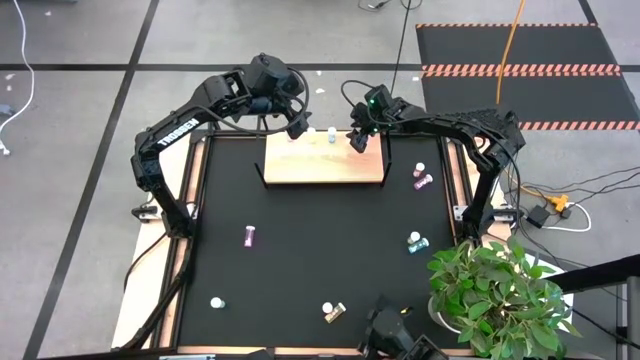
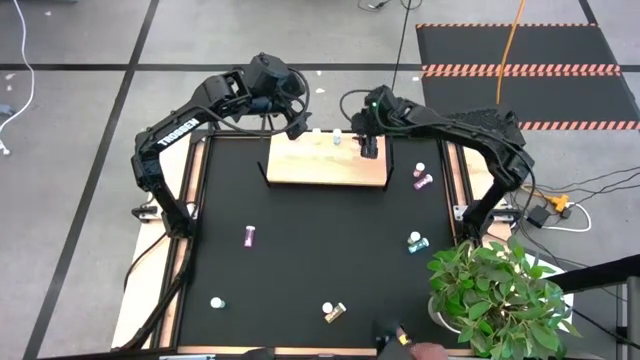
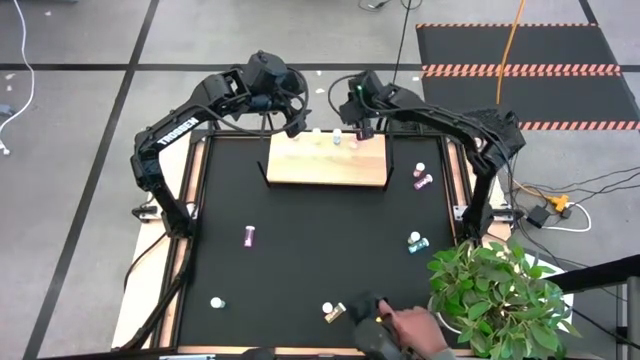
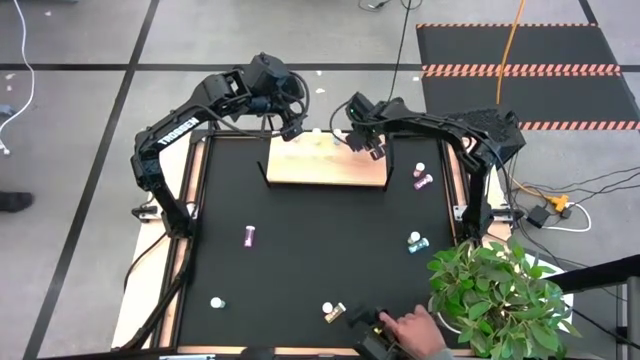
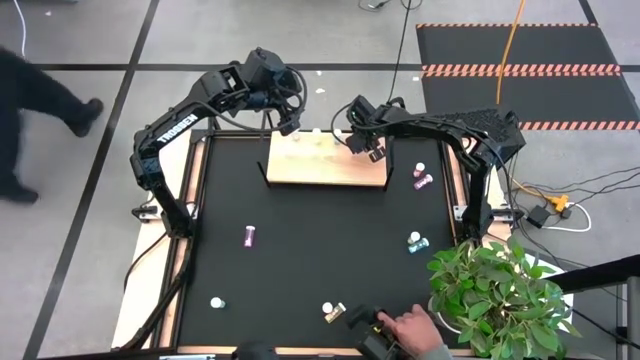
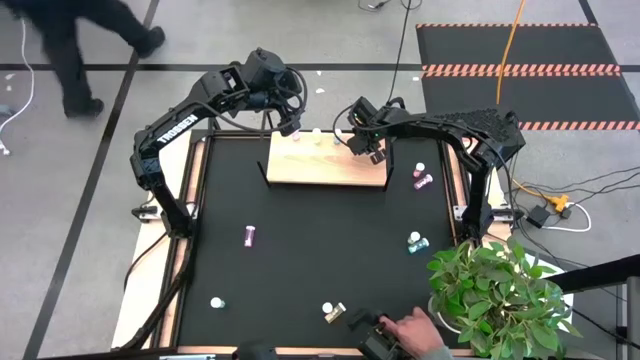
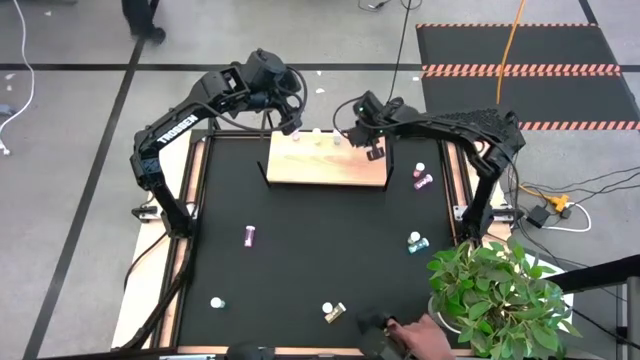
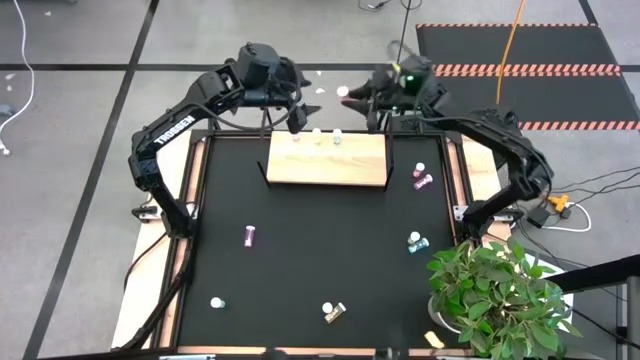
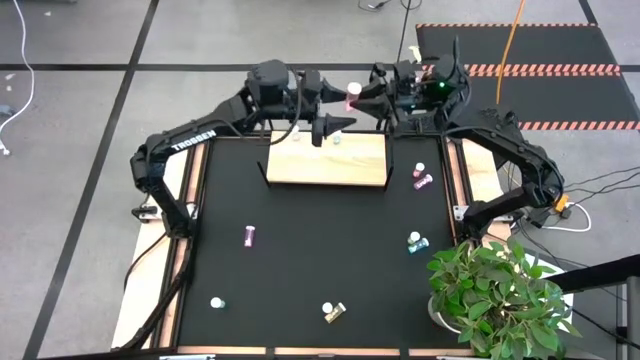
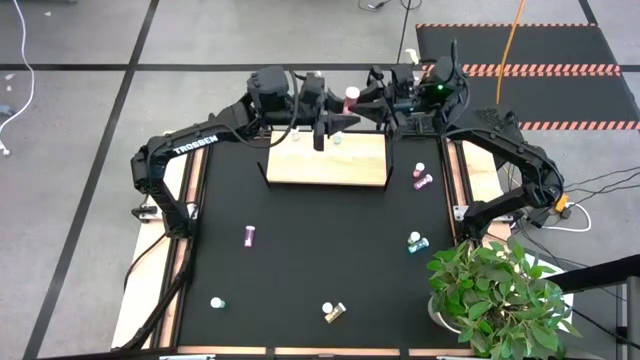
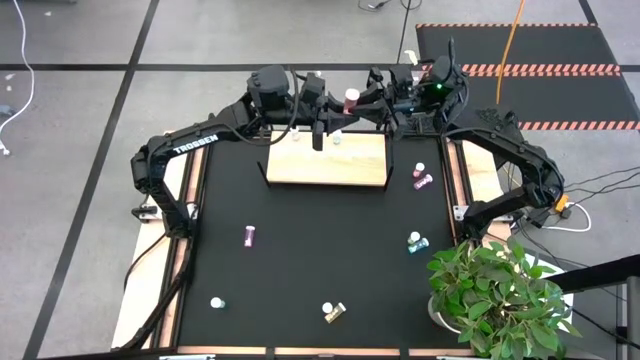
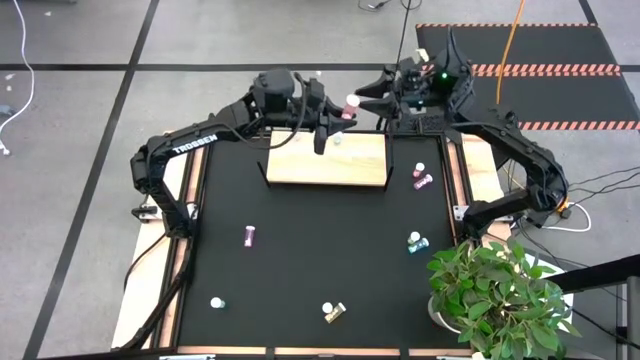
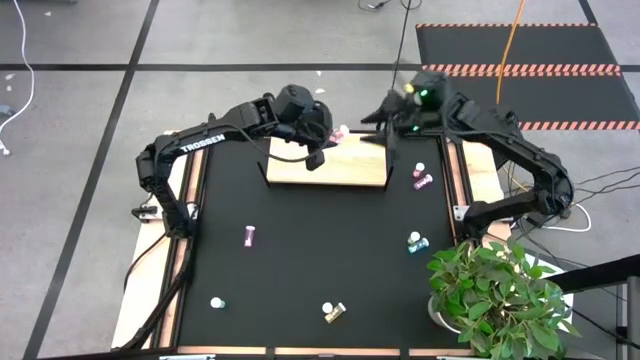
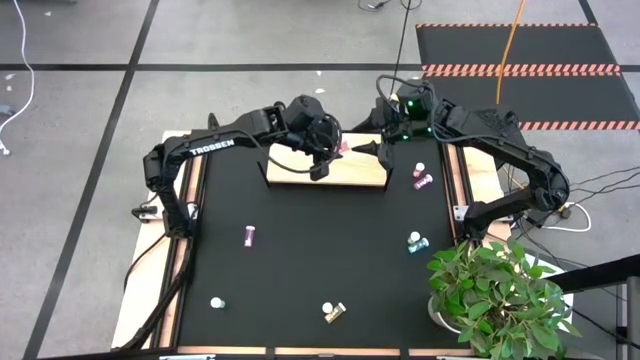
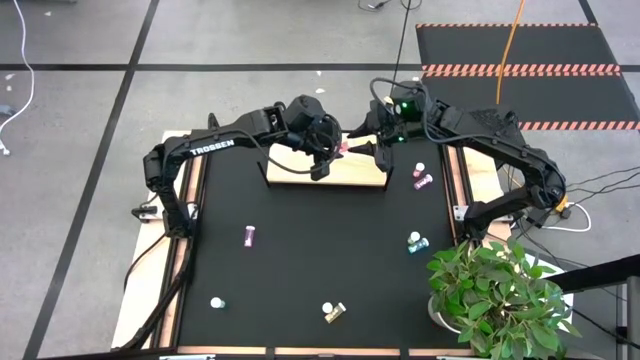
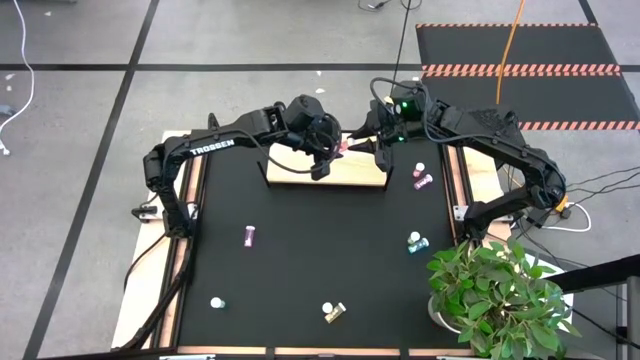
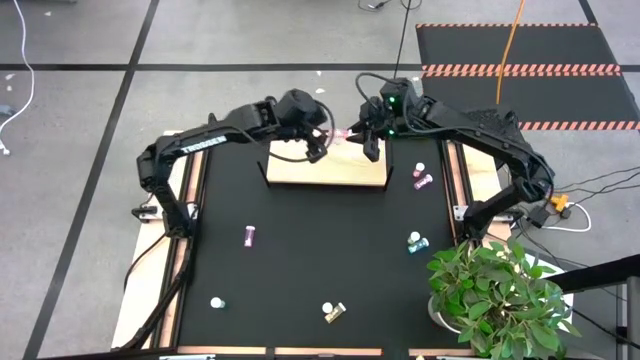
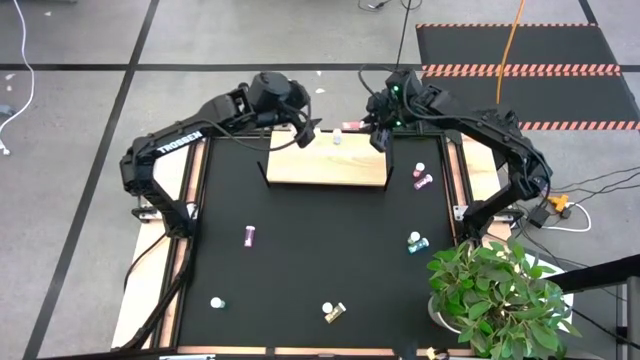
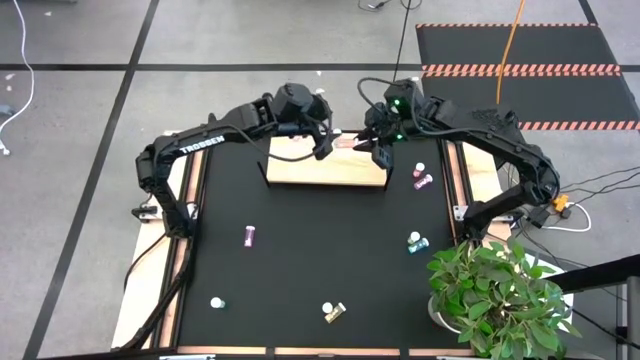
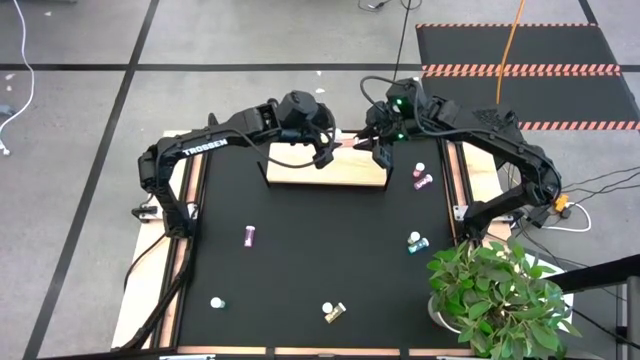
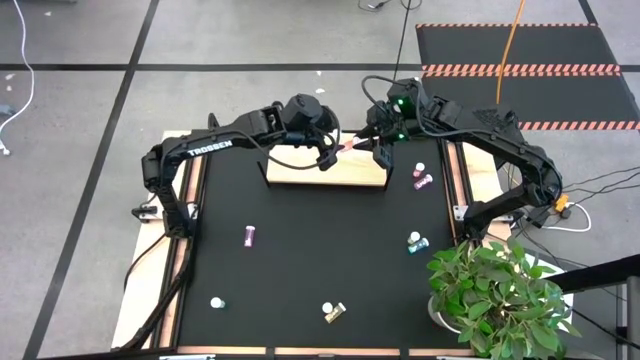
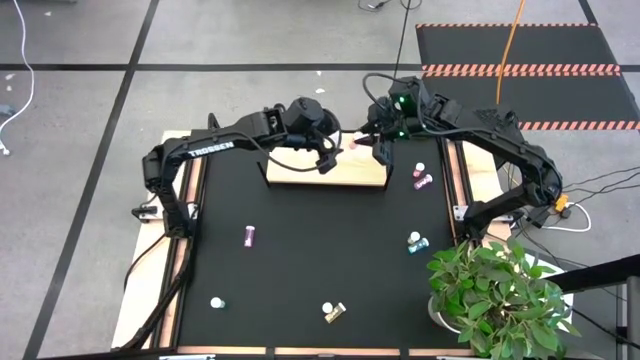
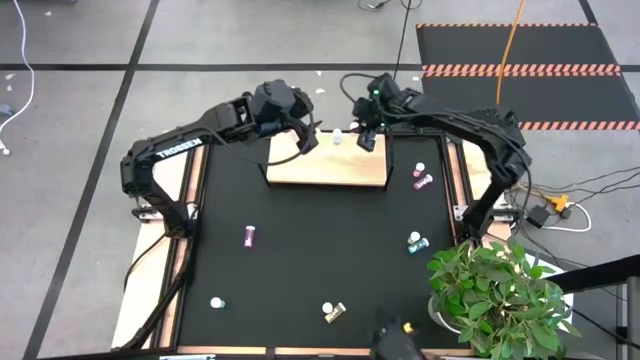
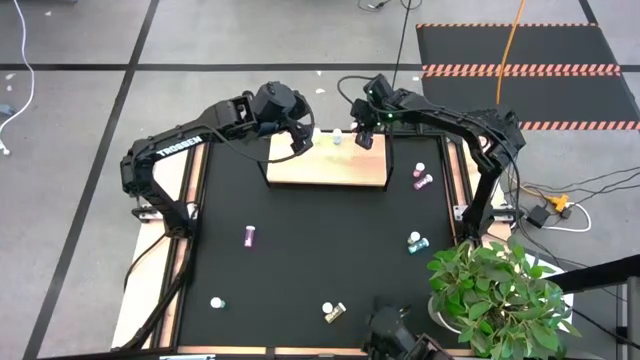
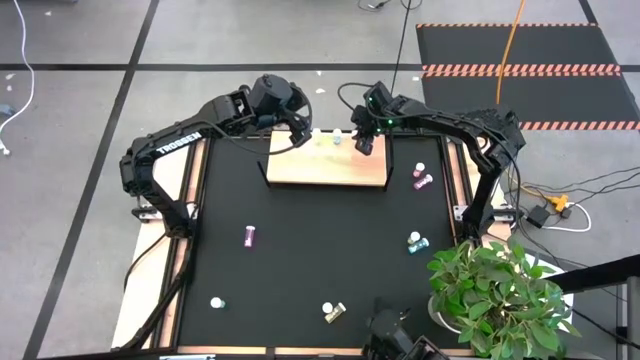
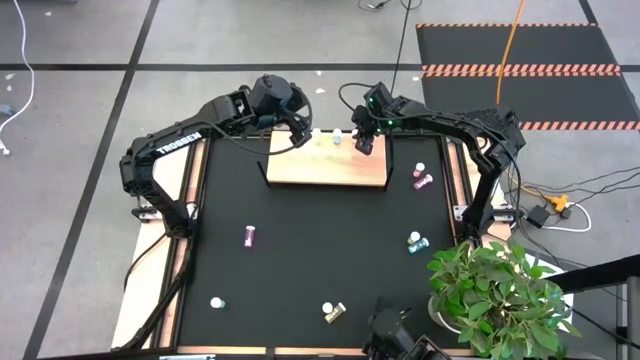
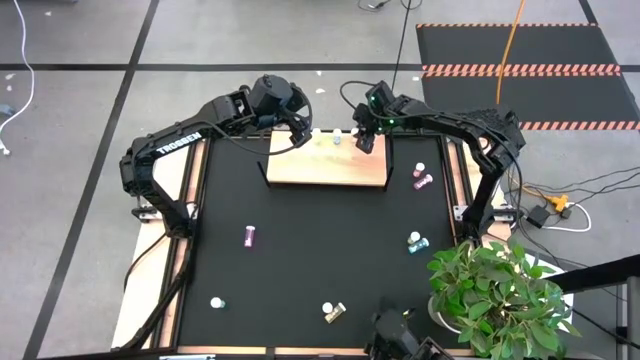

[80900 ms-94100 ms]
Task: Pick and place medicine bottles onto shelf by color
Put the left orange pill bottle on the shelf
